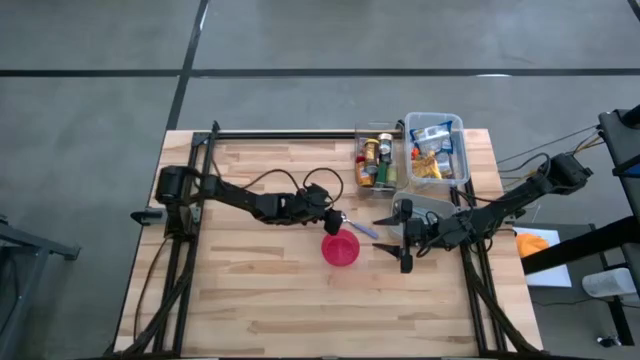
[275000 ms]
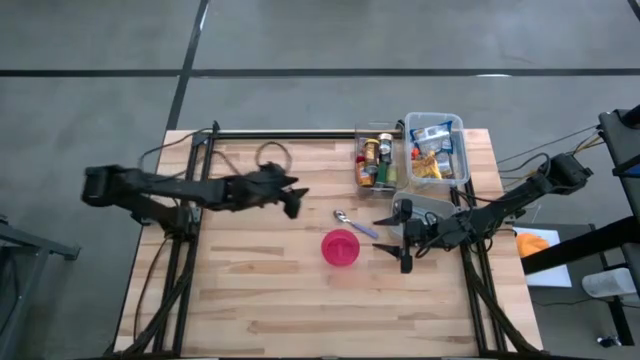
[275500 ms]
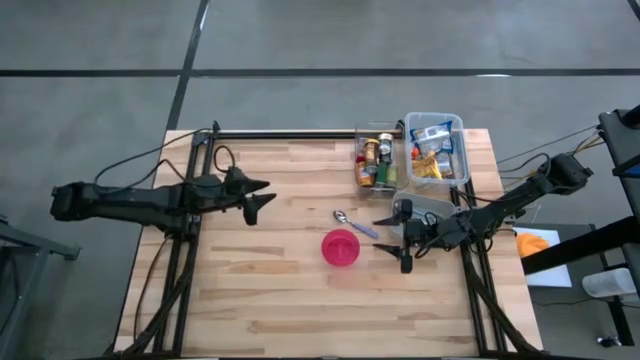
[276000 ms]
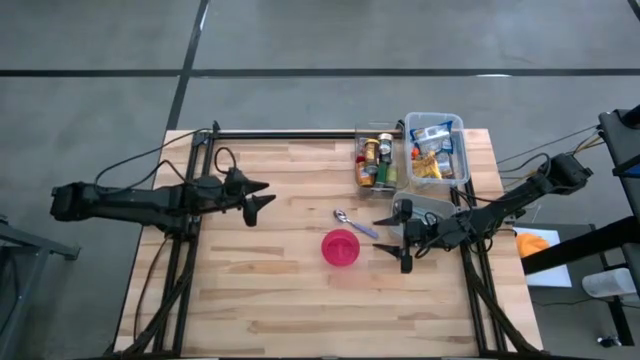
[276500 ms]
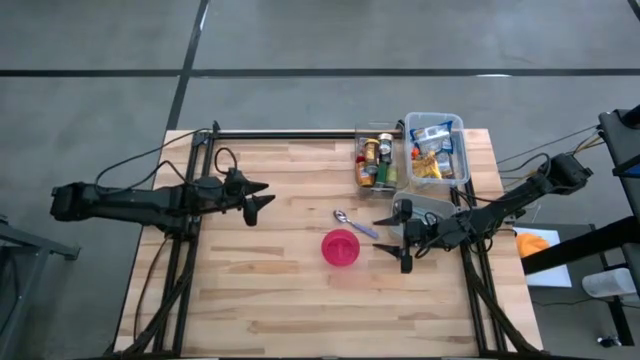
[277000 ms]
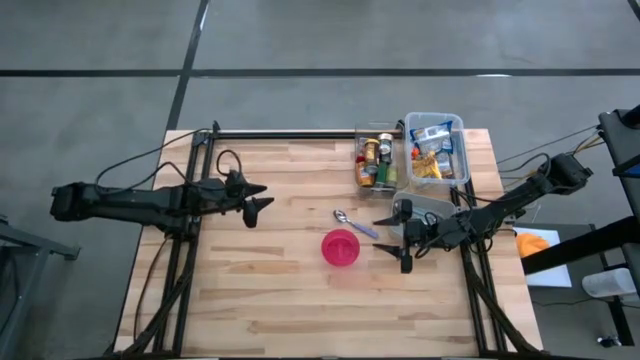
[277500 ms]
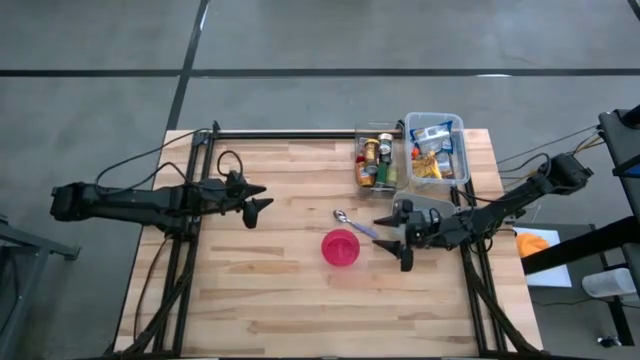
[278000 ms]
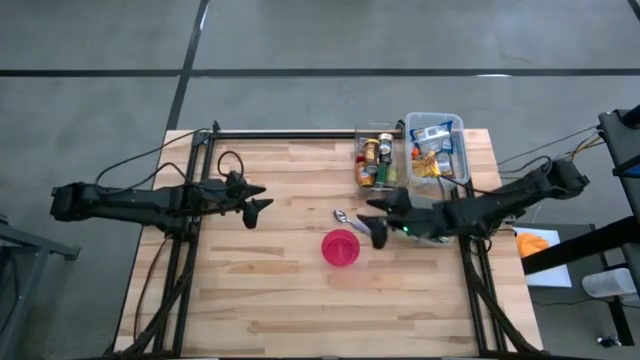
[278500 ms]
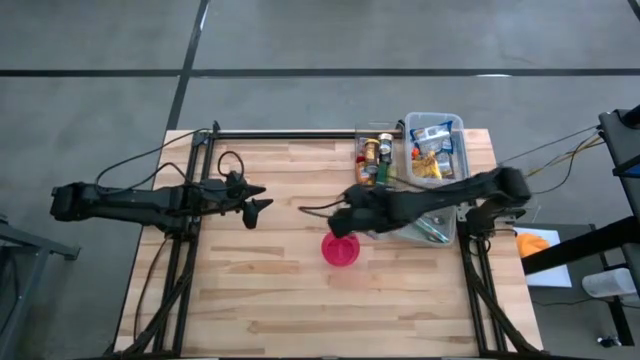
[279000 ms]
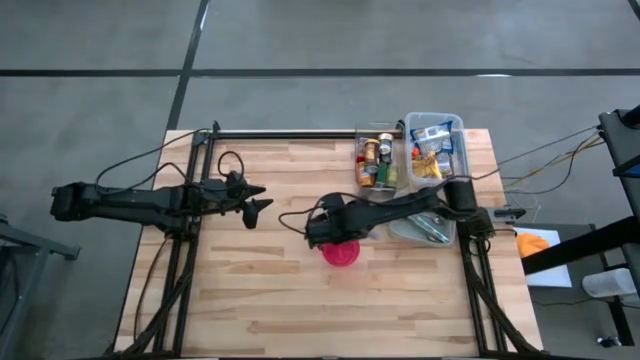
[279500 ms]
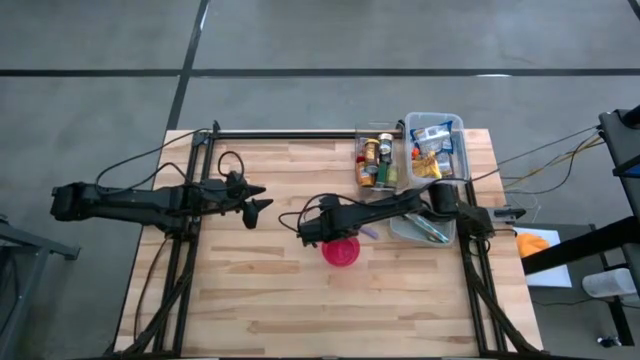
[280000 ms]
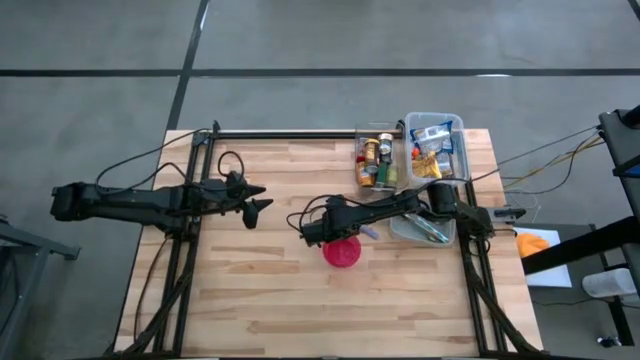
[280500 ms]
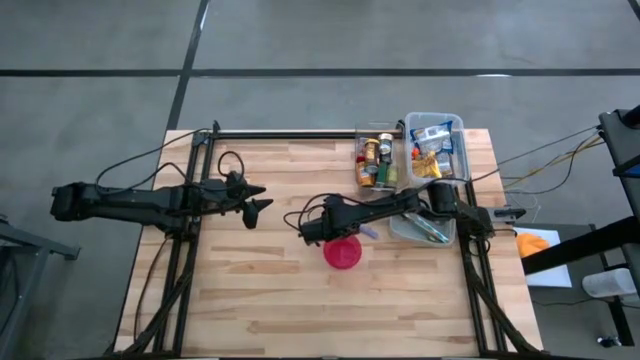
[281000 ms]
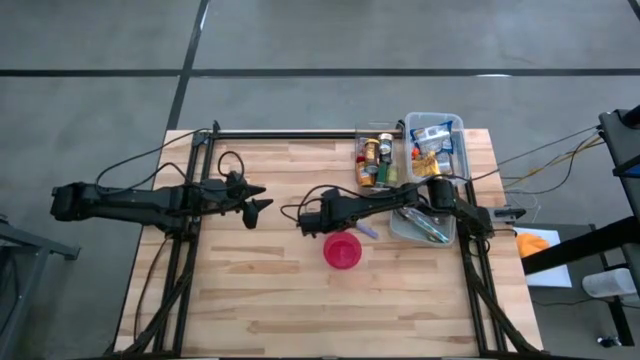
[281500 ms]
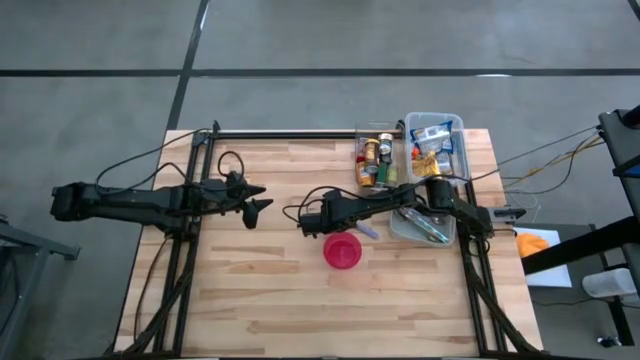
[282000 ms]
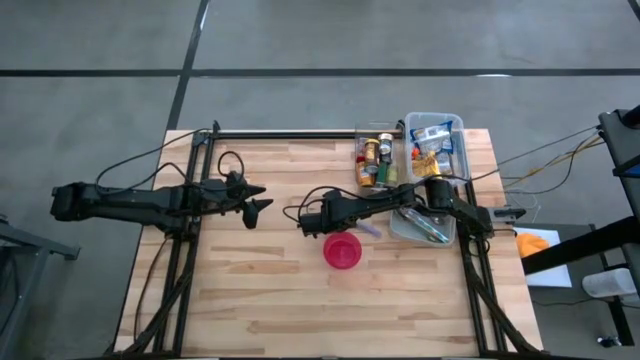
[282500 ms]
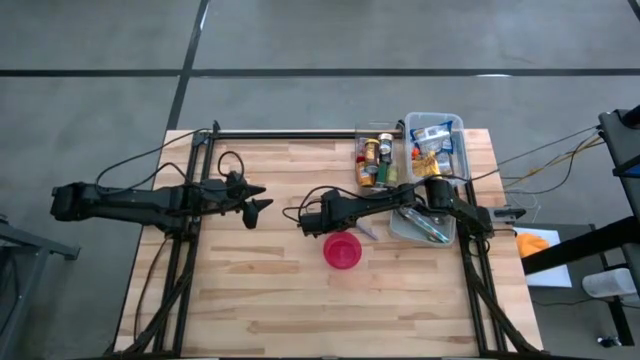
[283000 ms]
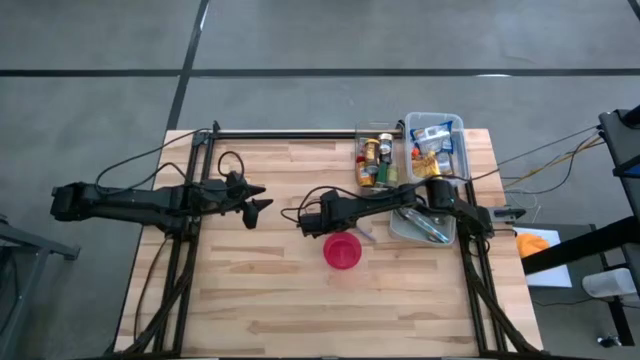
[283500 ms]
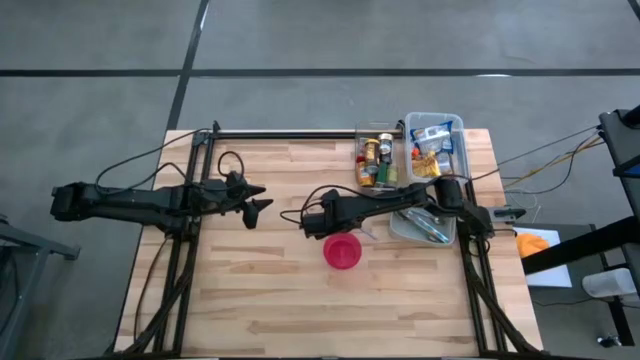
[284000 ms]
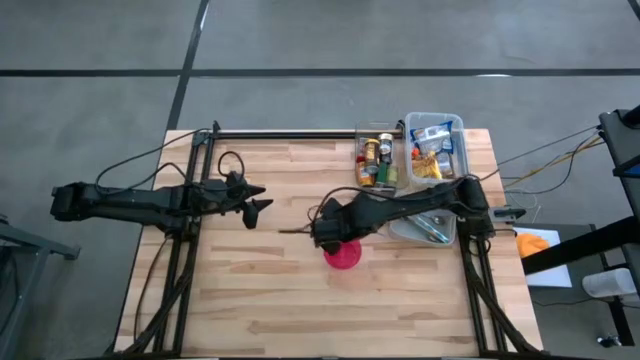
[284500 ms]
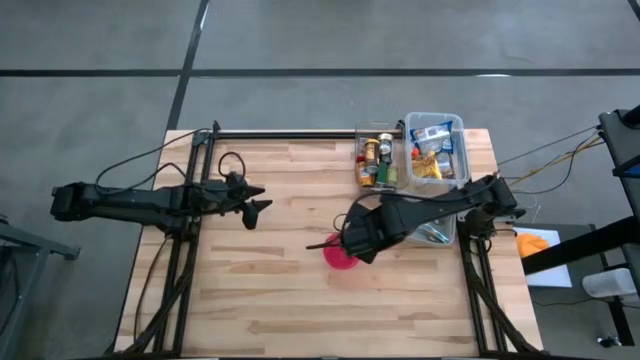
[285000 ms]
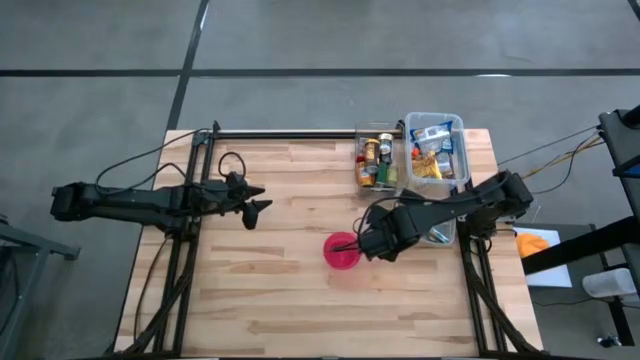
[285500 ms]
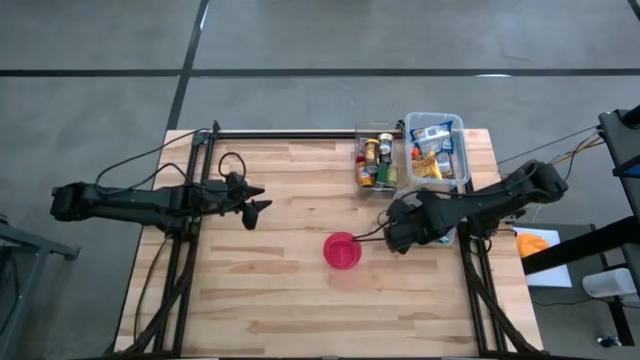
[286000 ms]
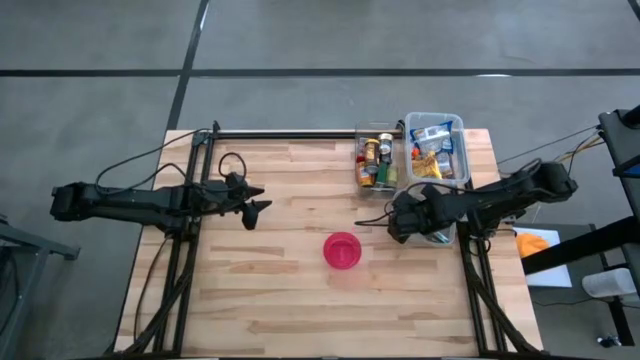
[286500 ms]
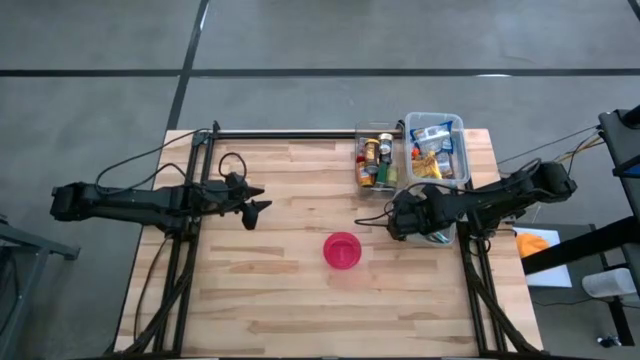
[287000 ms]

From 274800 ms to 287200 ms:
Put the purple spoon into the gray bin
